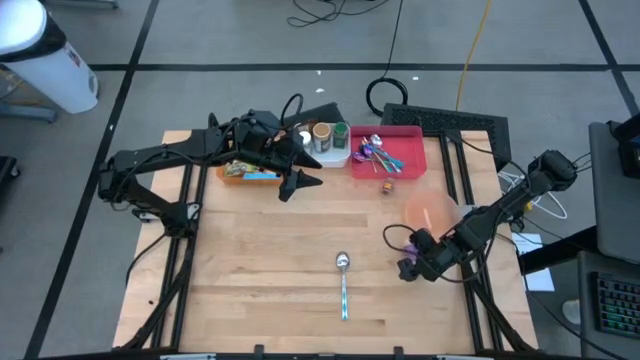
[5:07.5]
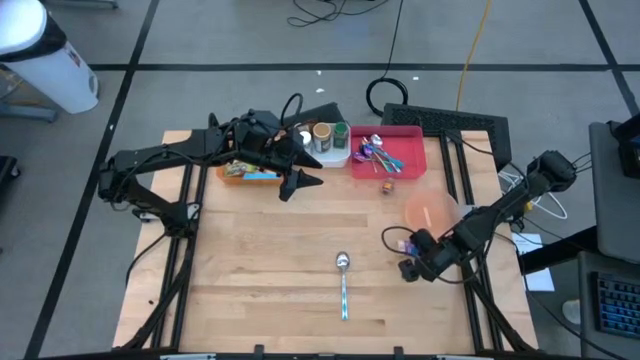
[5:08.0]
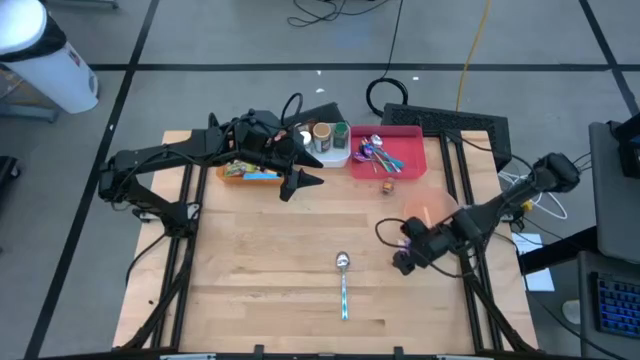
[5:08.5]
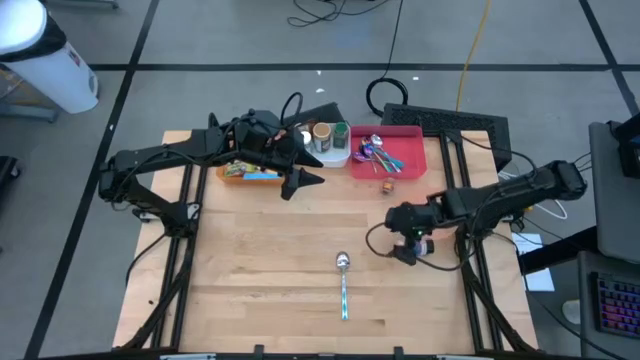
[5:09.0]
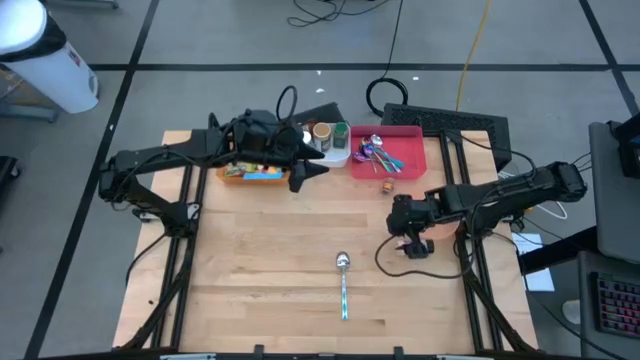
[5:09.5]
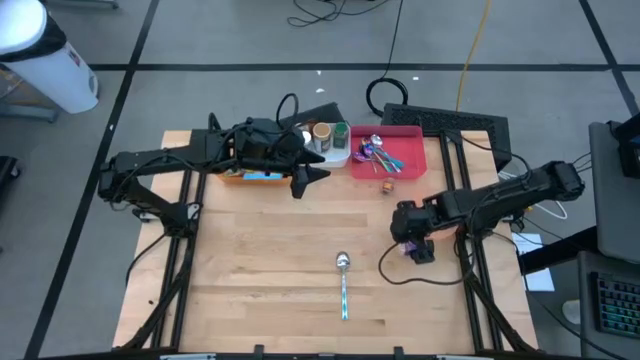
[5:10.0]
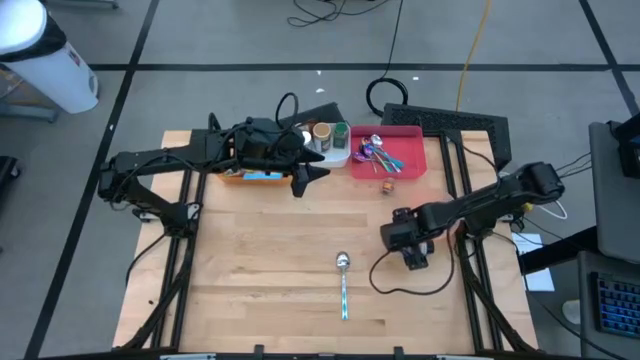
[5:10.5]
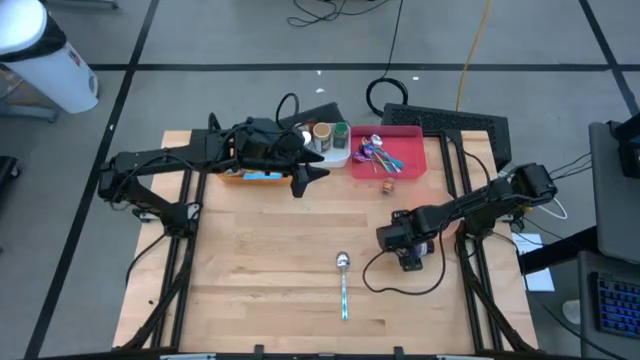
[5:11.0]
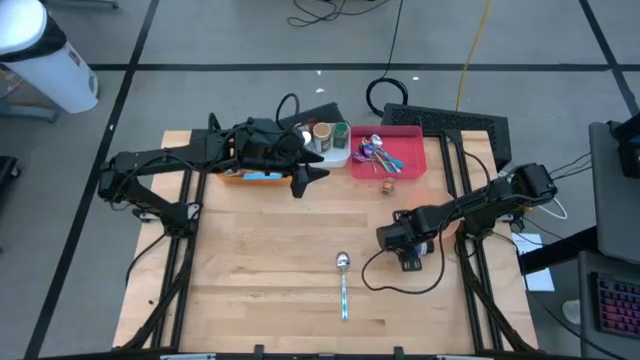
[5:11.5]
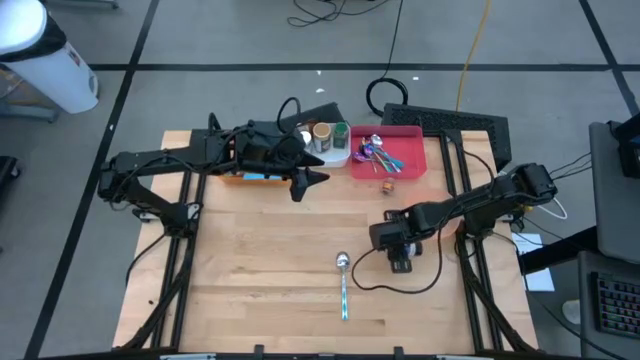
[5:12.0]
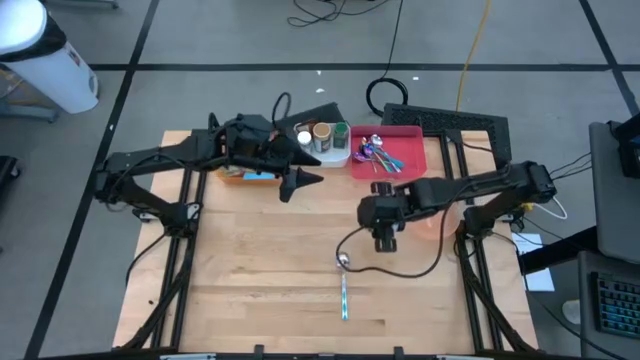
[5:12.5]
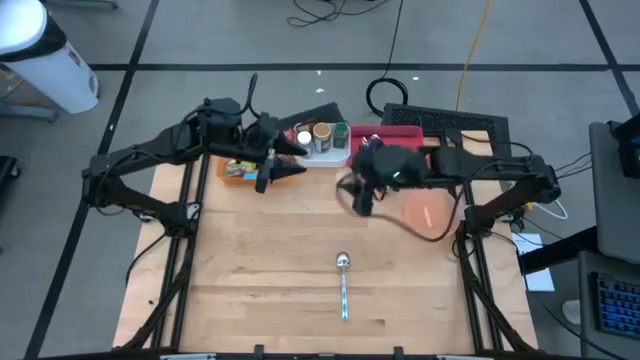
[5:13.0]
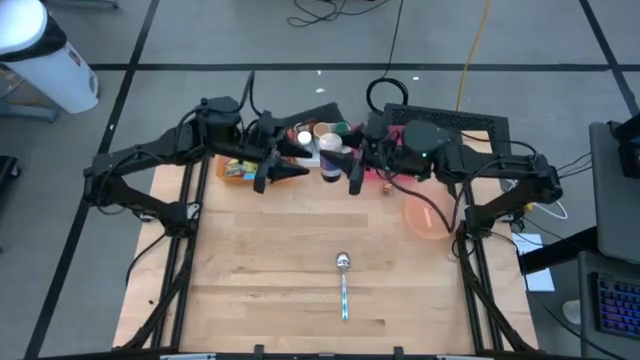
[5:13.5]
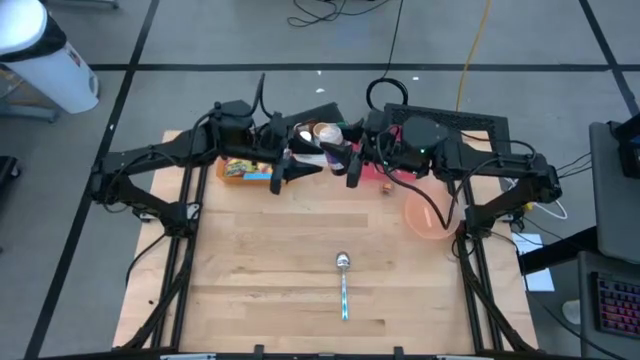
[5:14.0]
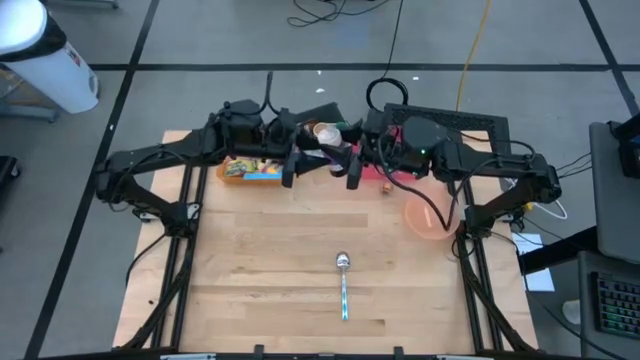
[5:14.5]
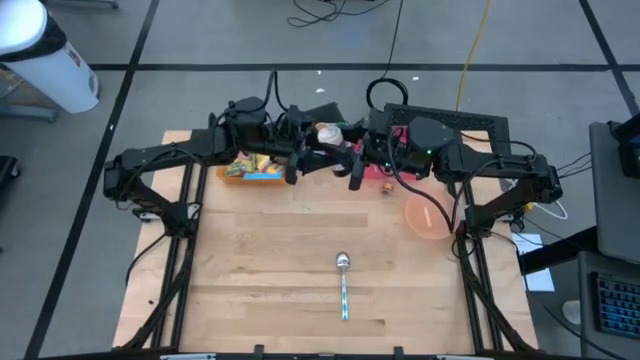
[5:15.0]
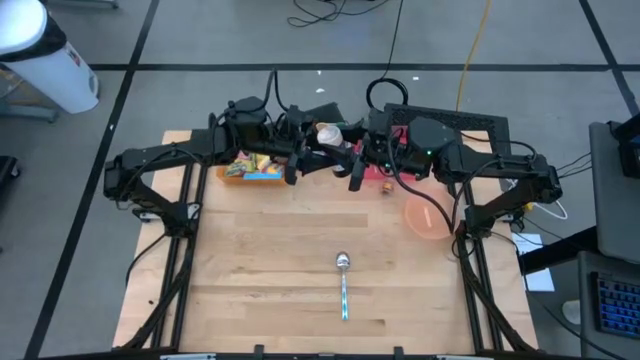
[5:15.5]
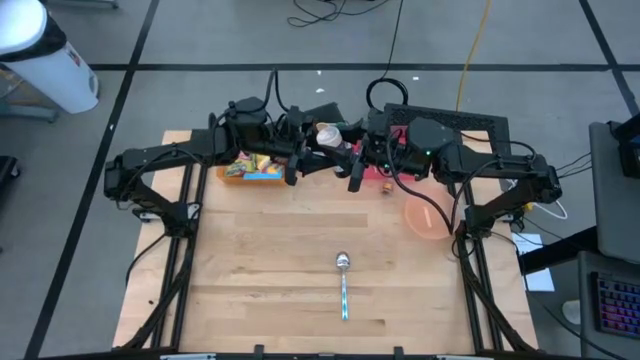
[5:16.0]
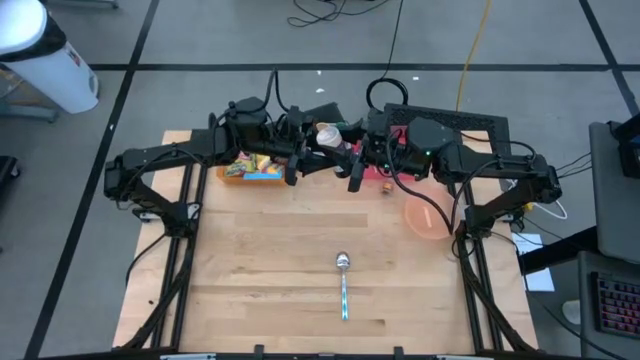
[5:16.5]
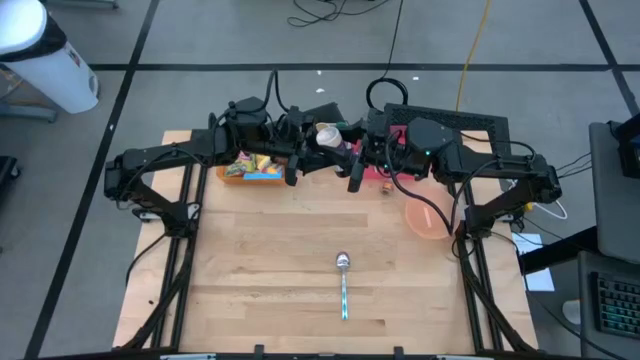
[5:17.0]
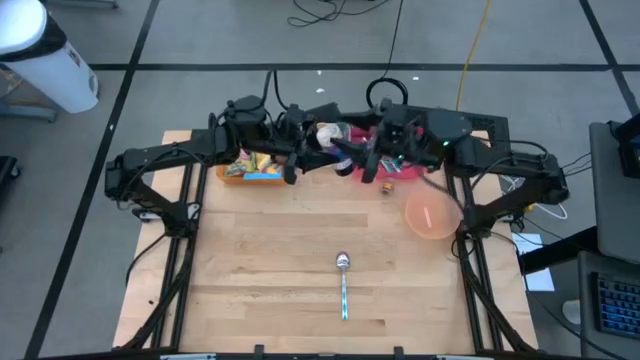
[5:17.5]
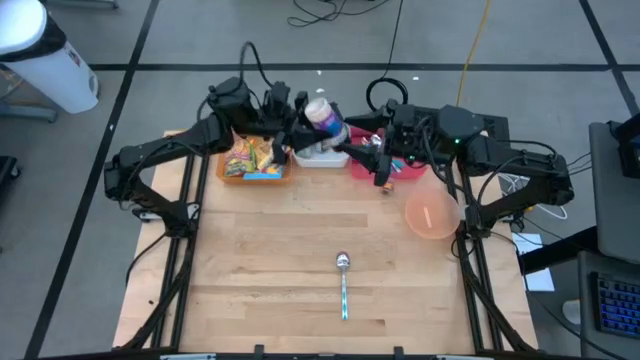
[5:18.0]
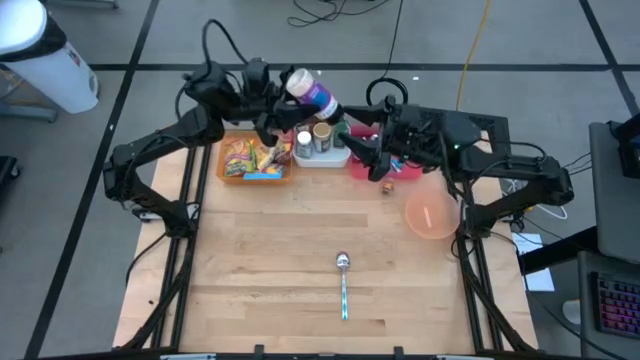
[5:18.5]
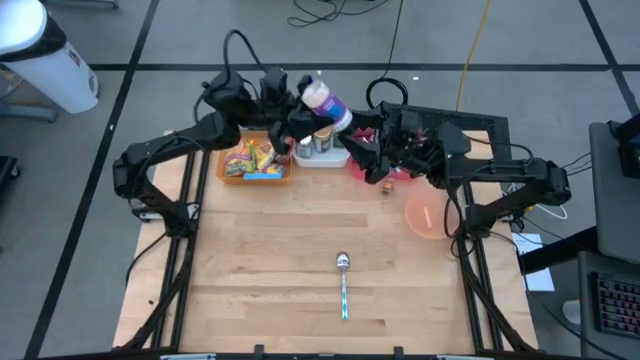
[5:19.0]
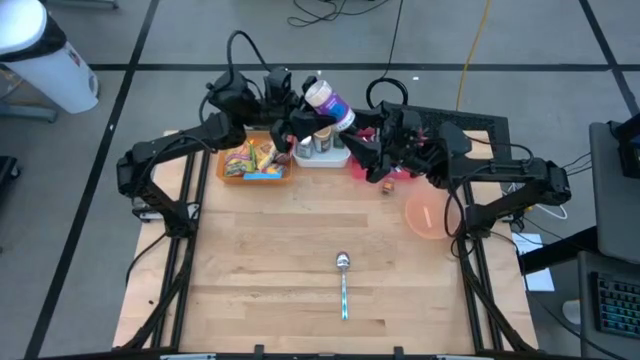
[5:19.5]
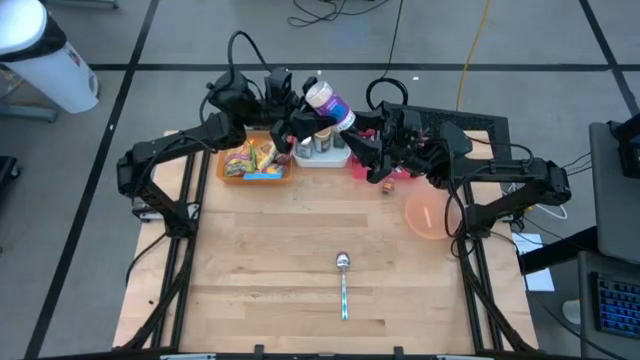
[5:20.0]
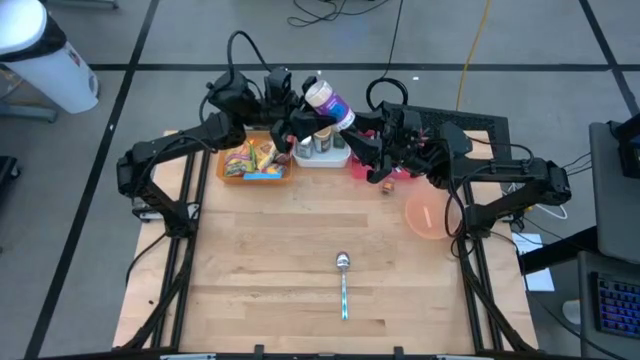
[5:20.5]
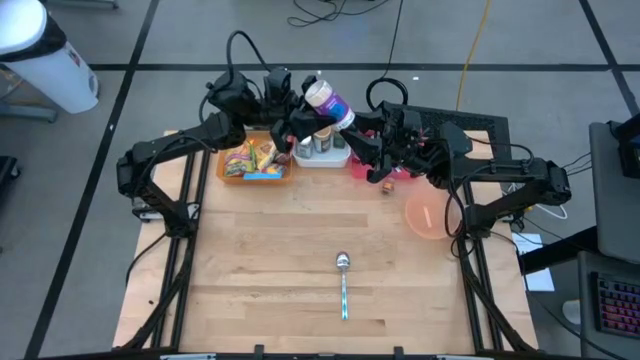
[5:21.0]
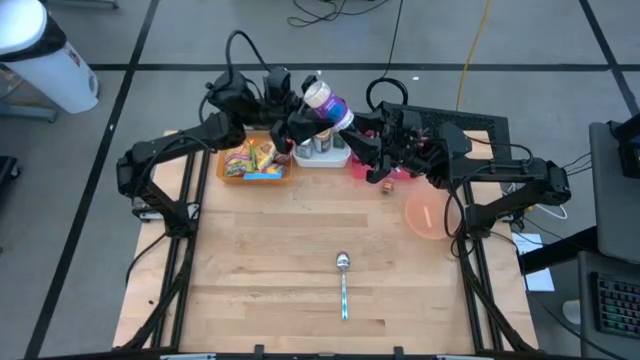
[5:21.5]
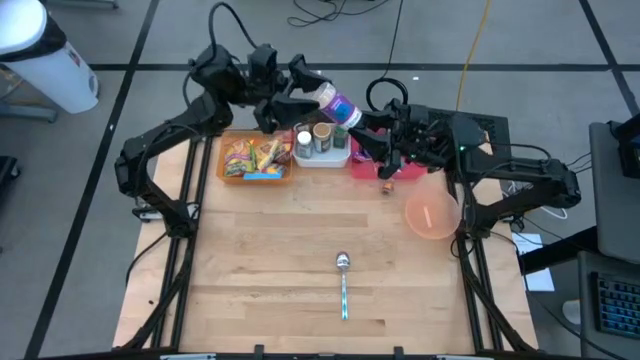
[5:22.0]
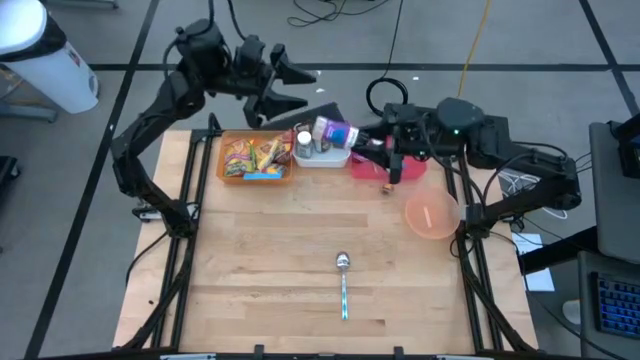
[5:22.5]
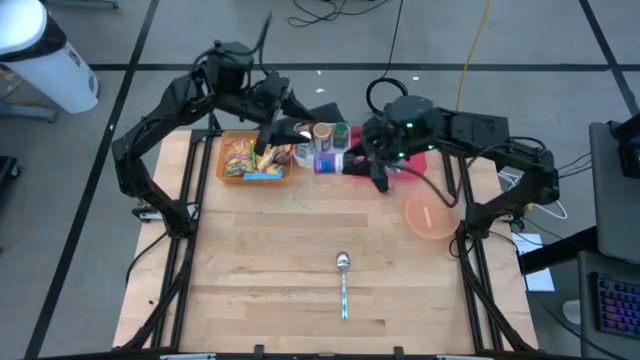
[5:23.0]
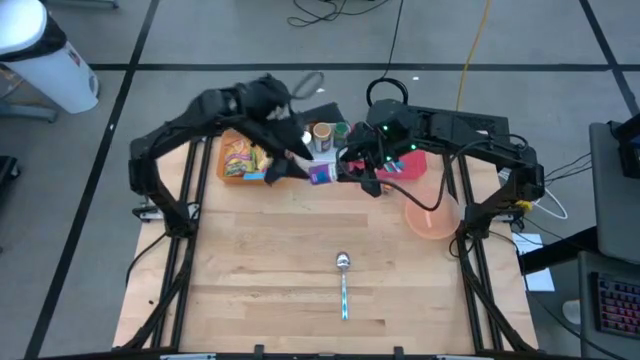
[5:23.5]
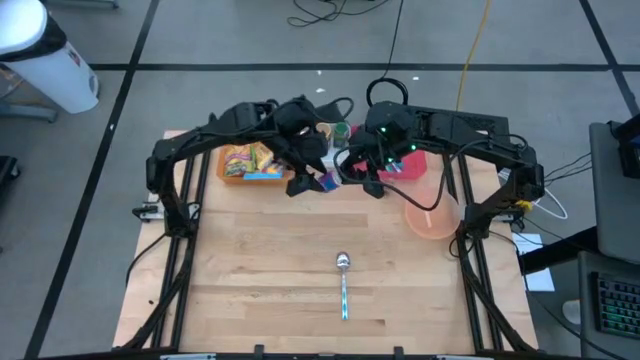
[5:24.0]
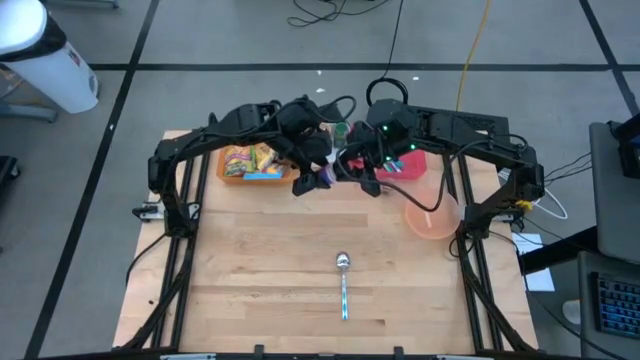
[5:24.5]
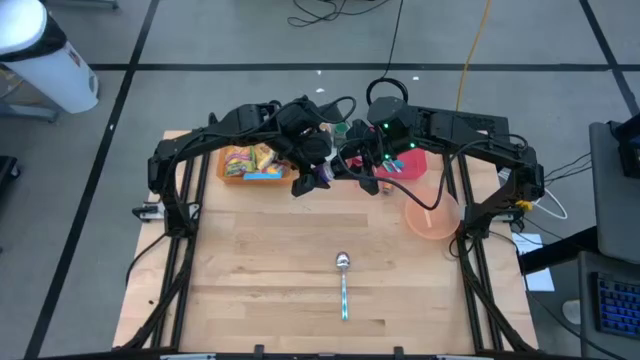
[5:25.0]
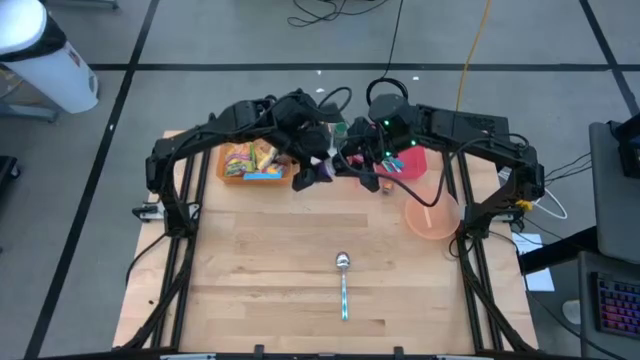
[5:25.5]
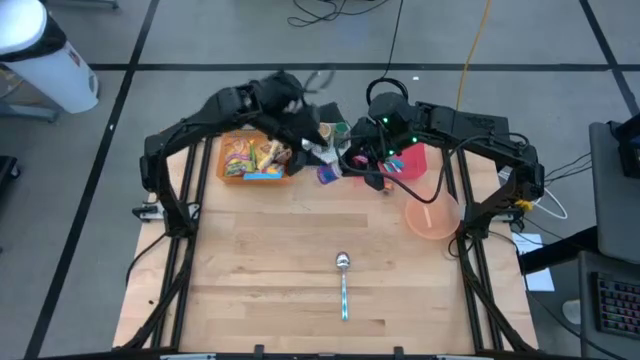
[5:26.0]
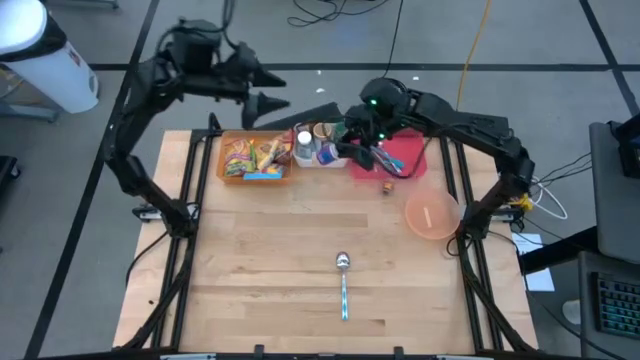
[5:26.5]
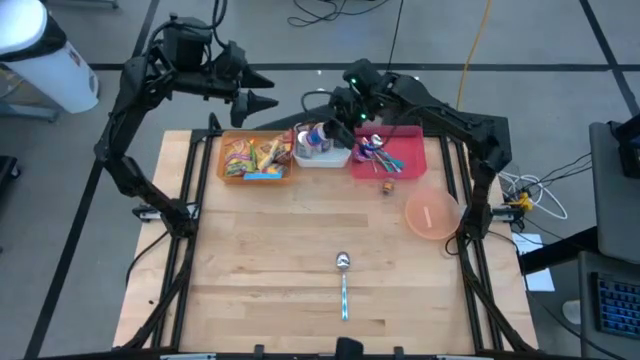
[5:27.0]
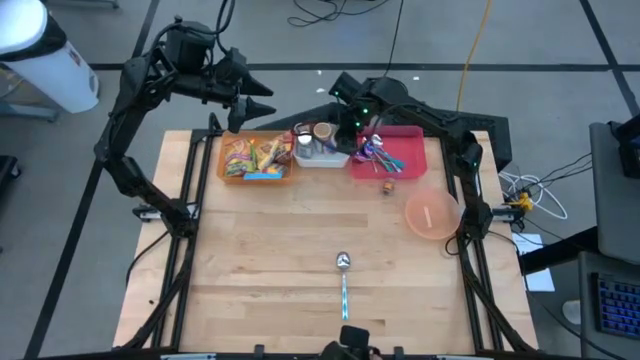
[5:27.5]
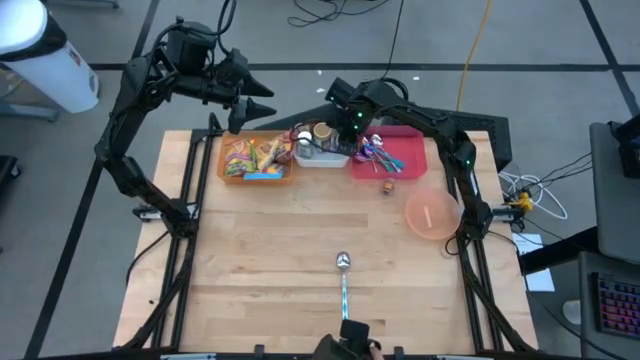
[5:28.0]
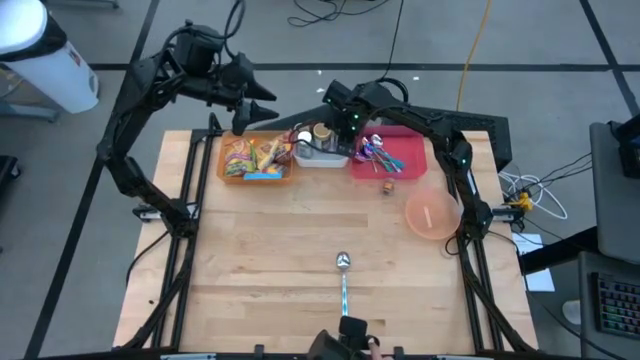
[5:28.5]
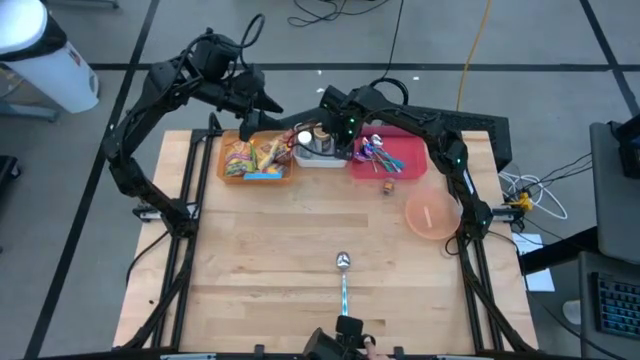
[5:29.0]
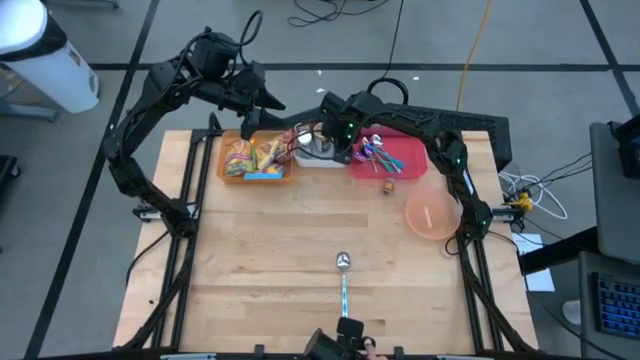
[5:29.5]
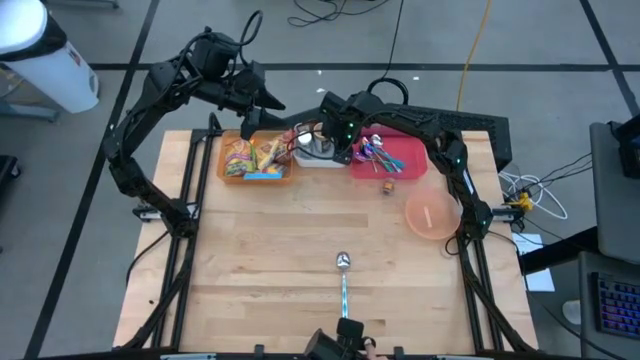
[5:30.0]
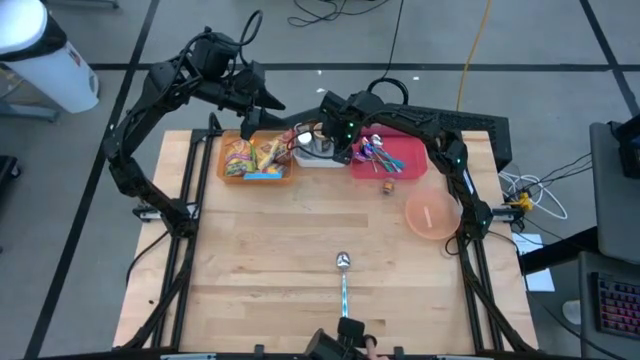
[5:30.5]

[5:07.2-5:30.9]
Task: Pick & Place Food Item
Put the purple seasoning bottle into the white bin
